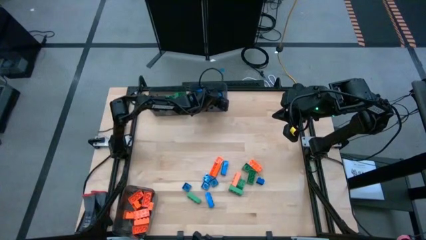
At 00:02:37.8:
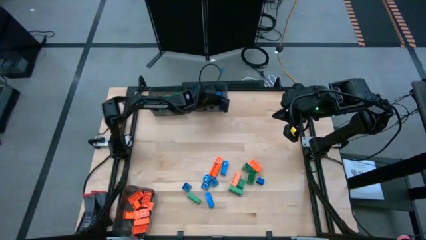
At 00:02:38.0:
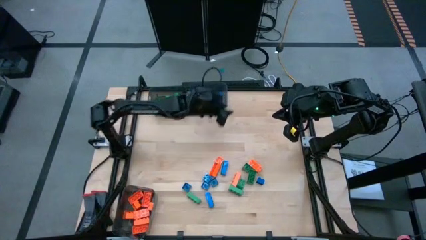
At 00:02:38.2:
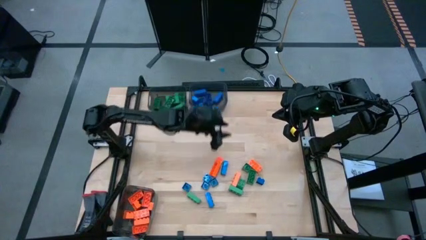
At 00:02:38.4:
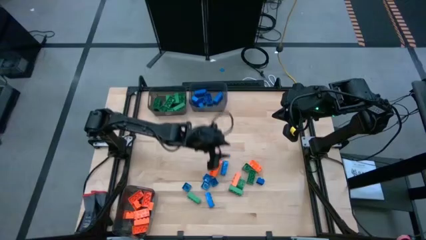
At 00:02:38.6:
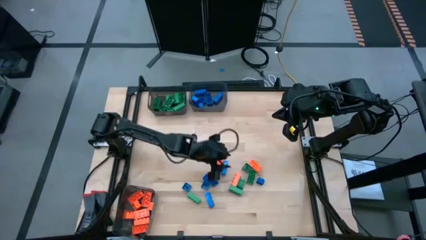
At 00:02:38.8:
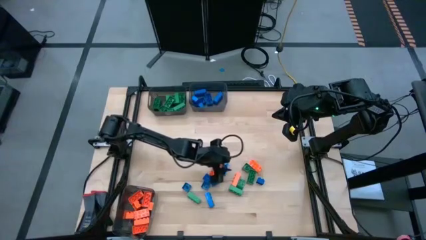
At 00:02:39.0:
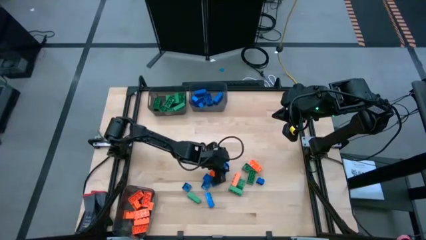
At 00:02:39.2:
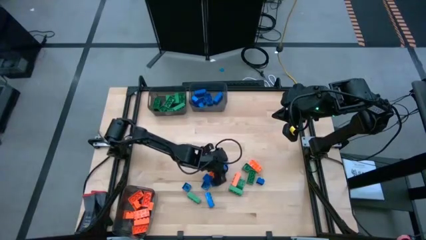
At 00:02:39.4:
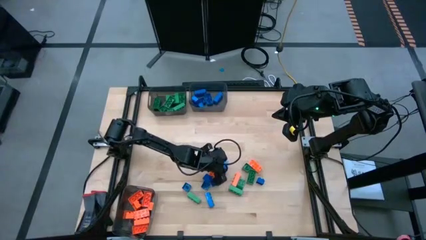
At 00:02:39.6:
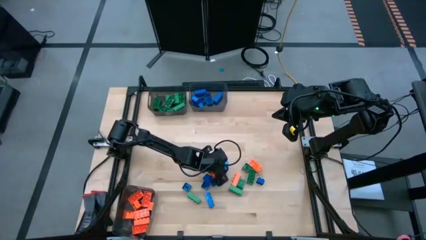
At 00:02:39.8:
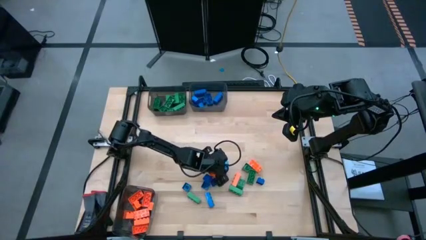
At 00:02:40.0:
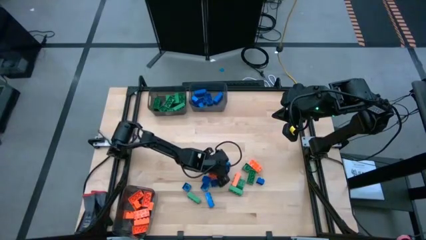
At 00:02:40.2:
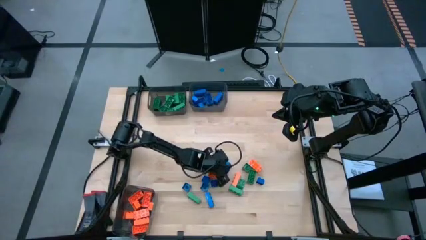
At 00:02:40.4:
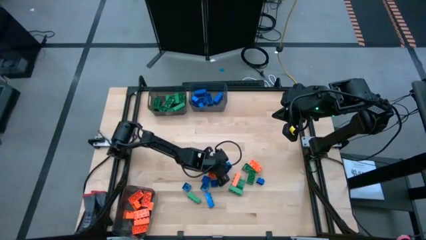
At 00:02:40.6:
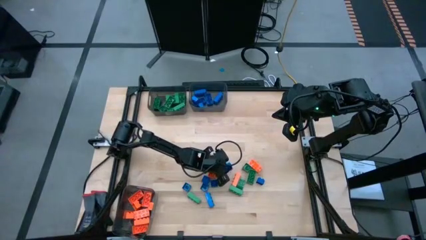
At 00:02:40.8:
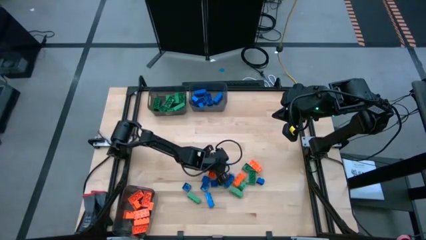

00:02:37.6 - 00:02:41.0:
Task: Sort blocks
Put the blue gamepiece into the top right black bin

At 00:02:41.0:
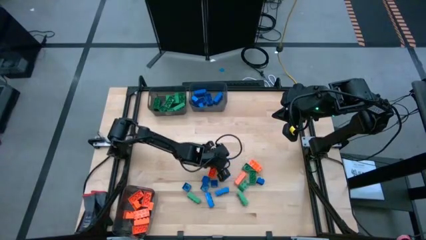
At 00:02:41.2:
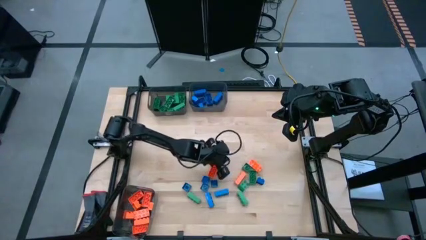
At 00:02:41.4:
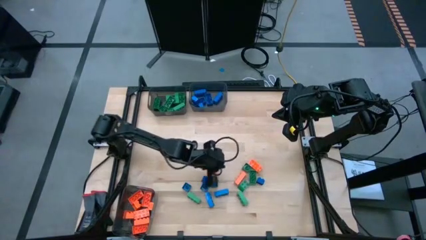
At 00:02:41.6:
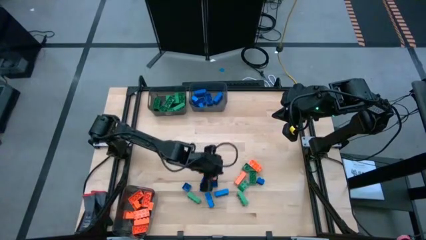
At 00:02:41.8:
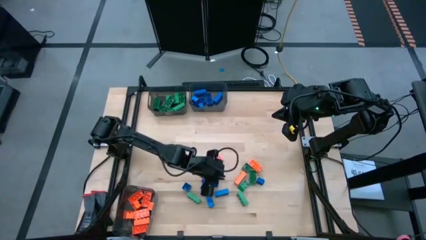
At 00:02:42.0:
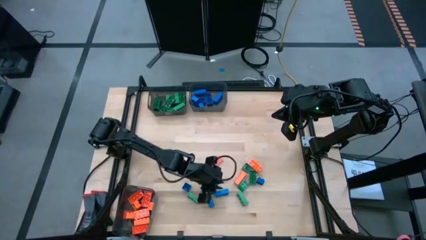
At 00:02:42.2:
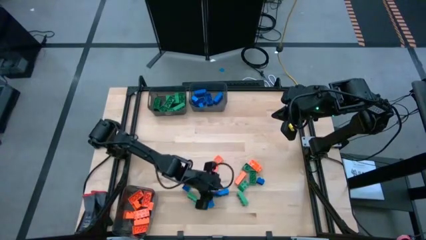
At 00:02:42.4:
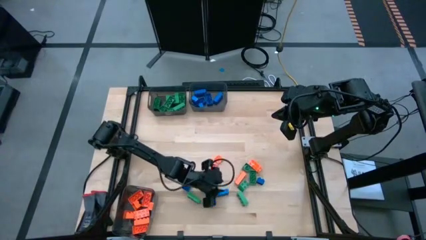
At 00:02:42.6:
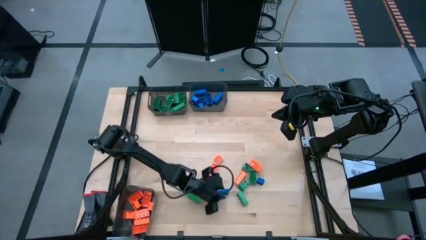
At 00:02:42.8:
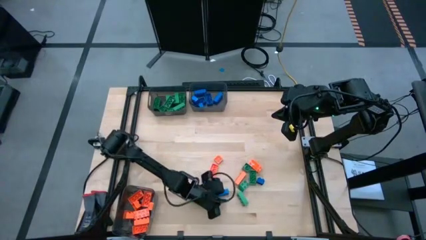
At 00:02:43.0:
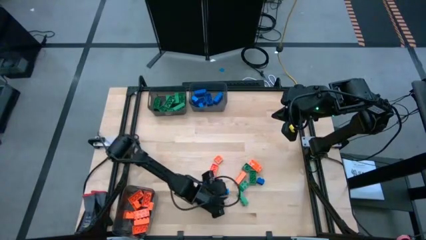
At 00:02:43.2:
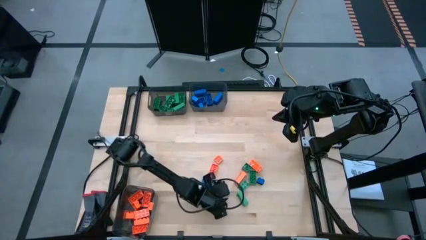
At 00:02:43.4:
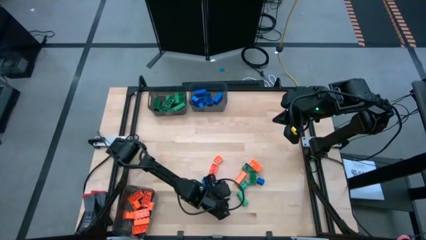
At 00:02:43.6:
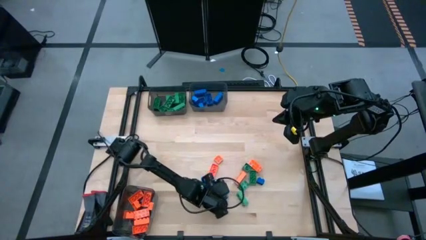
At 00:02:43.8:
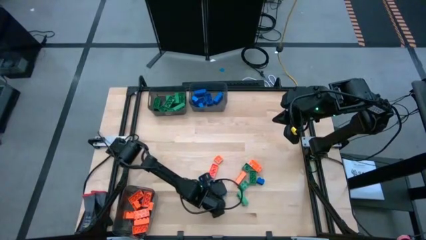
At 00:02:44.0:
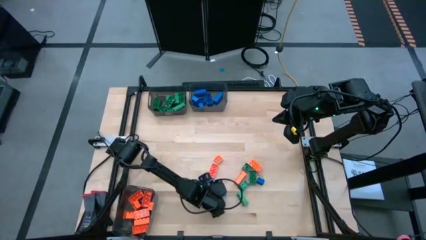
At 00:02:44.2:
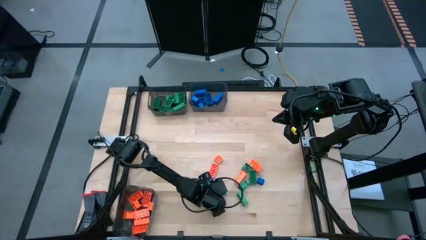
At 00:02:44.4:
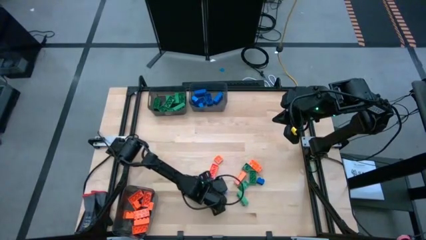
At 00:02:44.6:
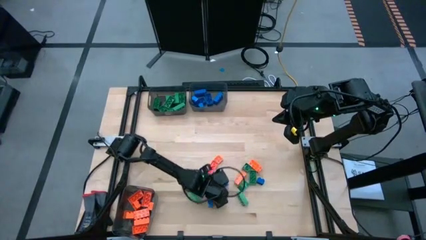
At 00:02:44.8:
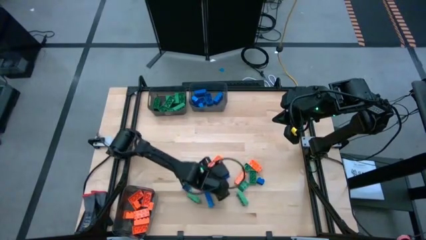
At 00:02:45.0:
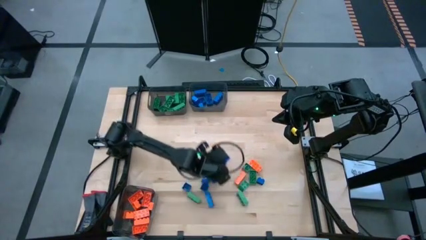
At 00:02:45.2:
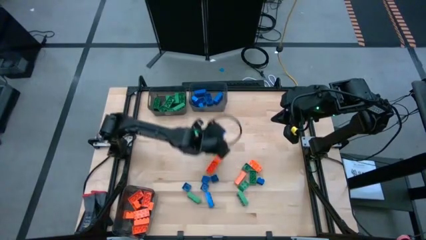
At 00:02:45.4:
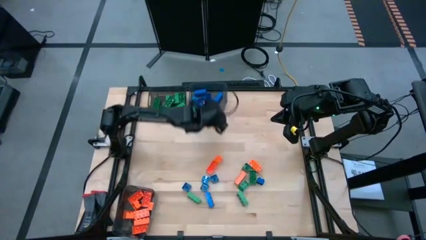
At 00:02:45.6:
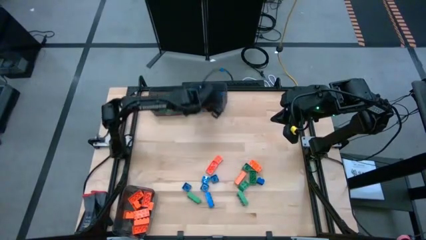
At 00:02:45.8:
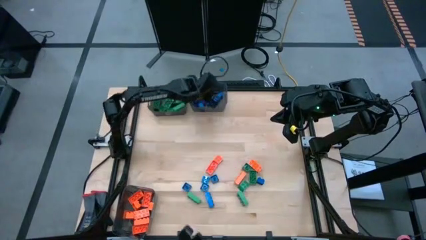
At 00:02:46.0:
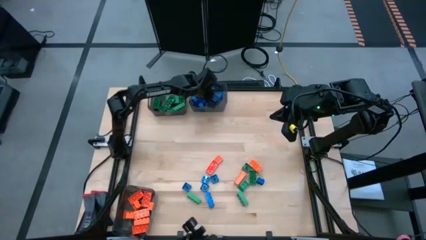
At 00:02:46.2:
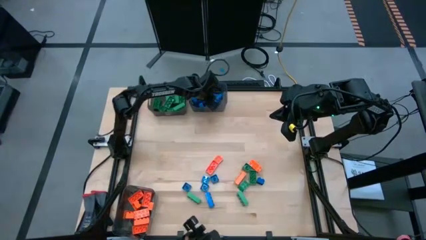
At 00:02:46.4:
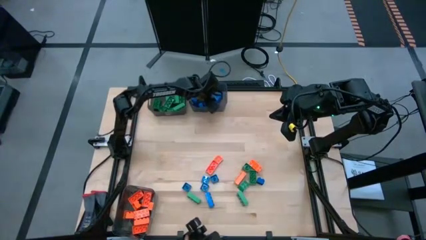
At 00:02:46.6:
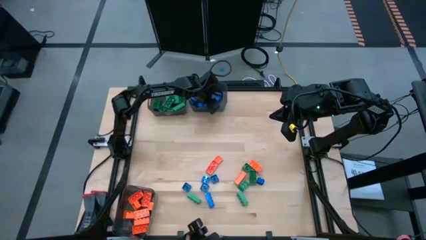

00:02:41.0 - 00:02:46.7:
Put the blue gamepiece into the top right black bin

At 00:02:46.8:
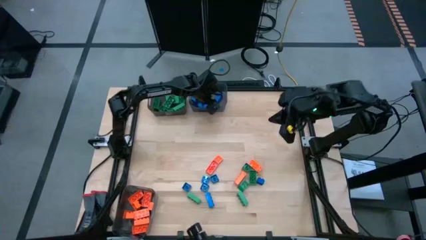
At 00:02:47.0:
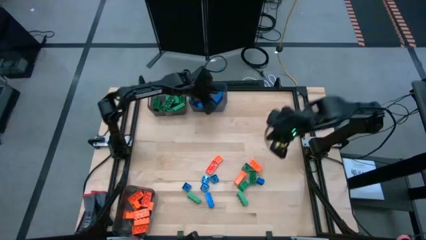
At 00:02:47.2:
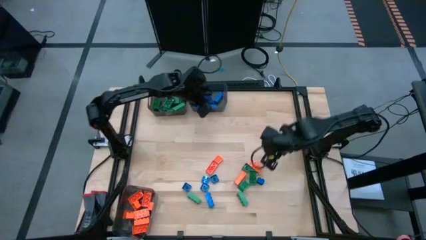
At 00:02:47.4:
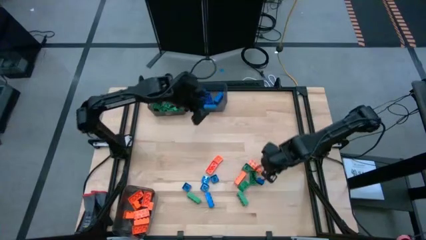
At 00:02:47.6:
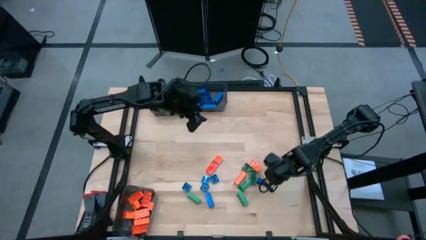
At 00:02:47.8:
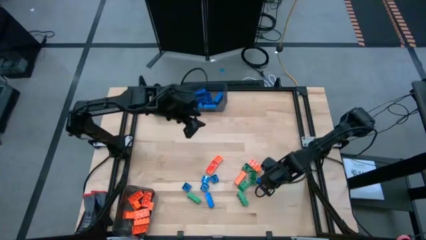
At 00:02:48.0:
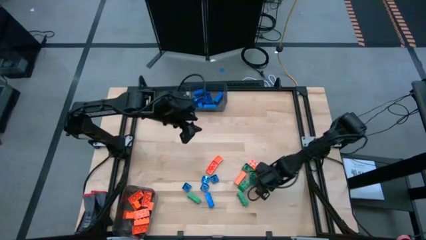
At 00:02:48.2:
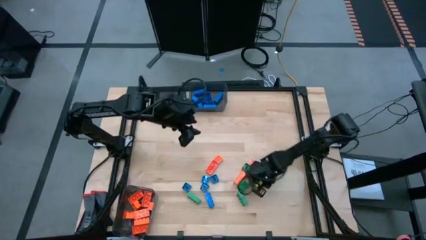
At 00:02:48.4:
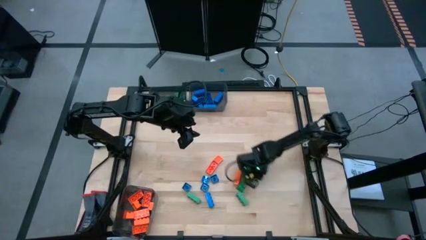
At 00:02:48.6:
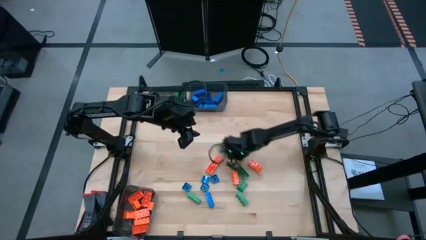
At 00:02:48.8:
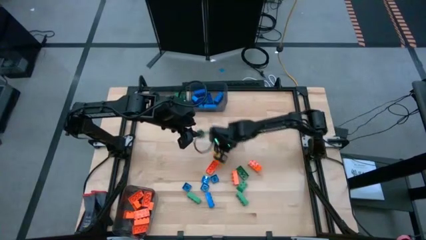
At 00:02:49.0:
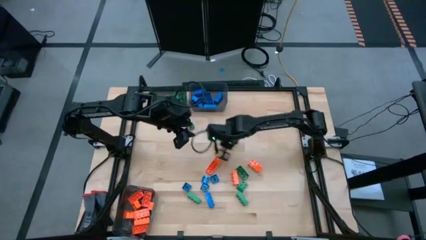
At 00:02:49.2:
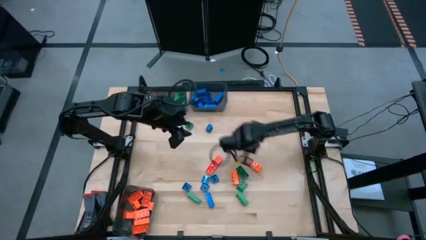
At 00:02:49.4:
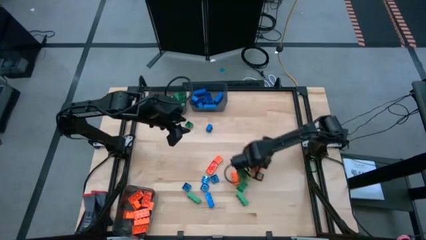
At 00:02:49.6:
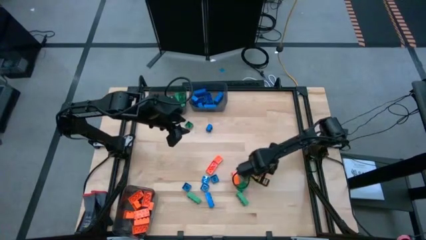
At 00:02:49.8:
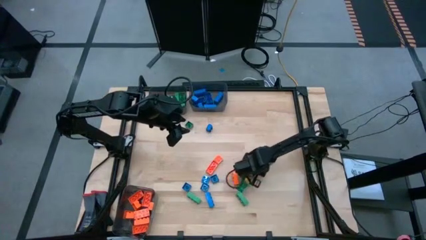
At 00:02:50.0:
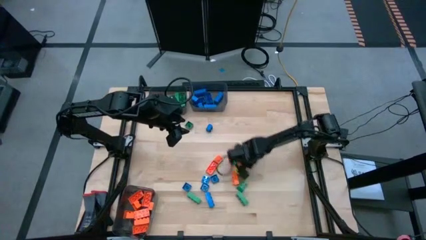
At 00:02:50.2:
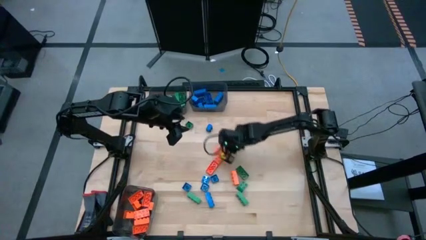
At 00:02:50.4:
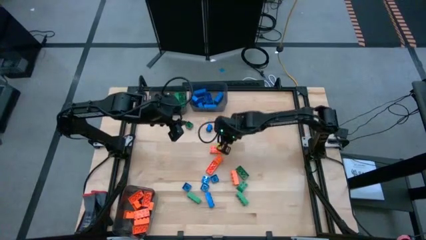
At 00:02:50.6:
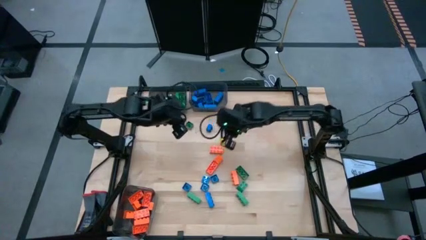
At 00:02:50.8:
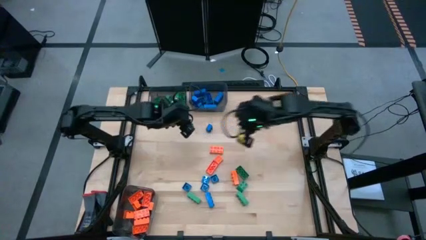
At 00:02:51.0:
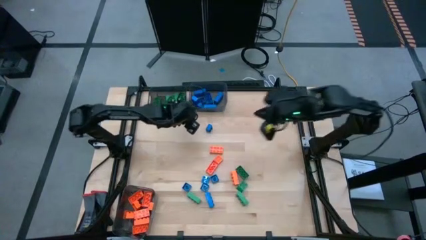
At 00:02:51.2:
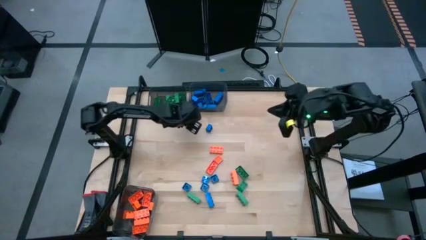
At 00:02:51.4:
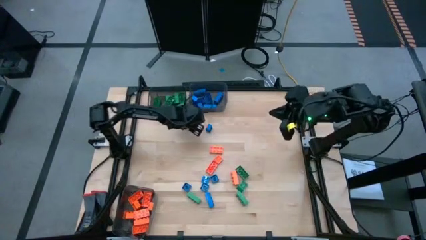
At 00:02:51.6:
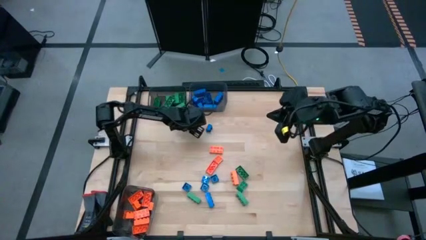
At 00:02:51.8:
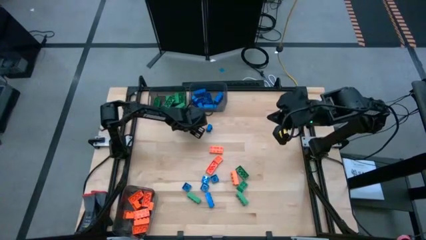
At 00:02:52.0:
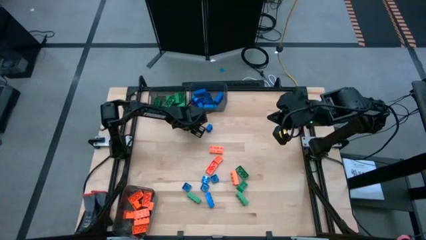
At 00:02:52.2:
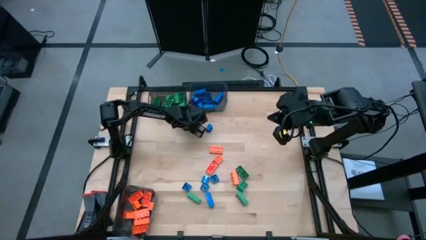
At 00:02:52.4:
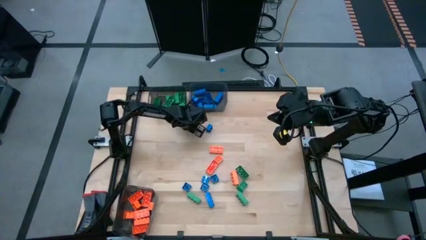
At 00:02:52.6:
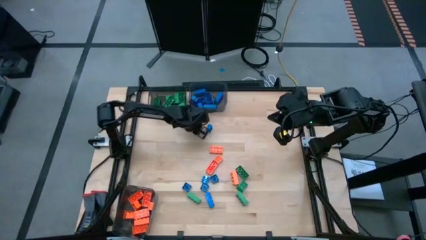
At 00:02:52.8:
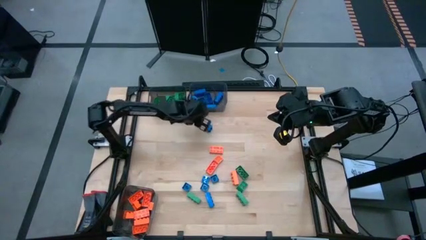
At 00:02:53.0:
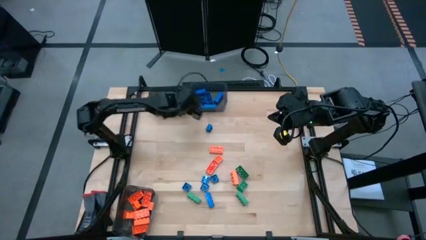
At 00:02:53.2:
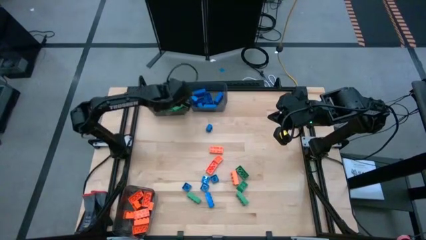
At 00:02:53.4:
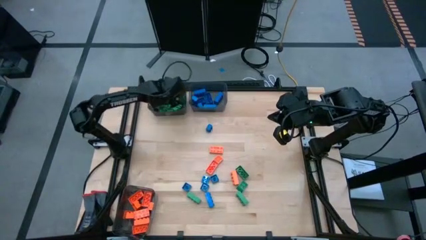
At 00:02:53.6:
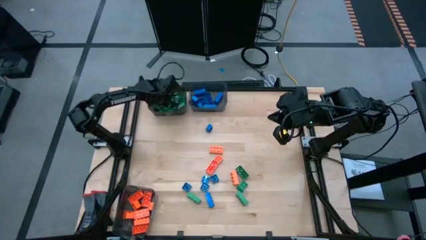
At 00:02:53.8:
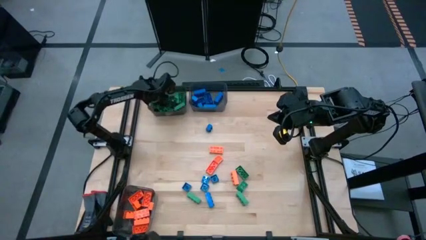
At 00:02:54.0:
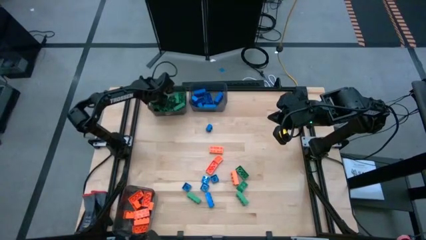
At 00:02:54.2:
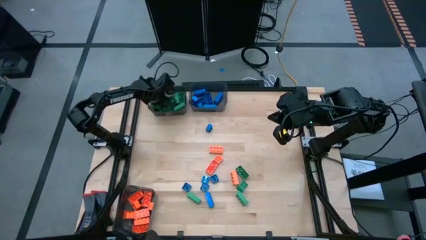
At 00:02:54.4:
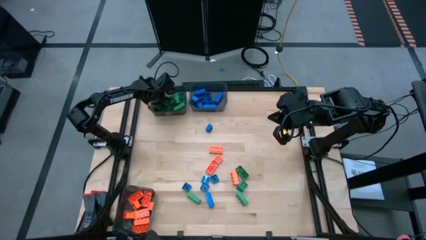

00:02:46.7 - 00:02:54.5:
Put the green gamepiece into the top left black bin
